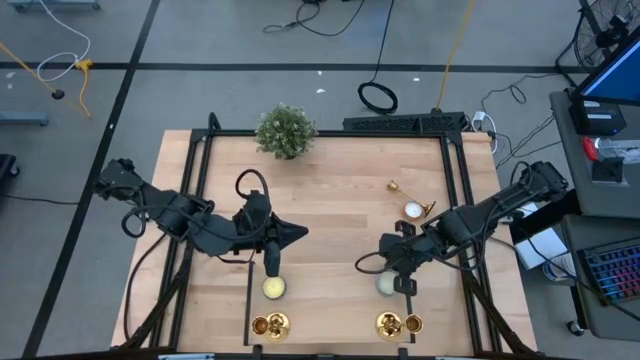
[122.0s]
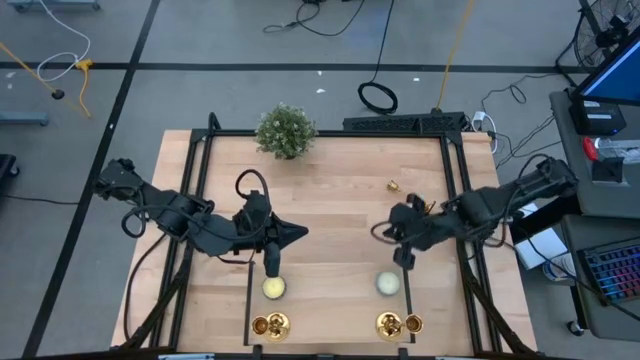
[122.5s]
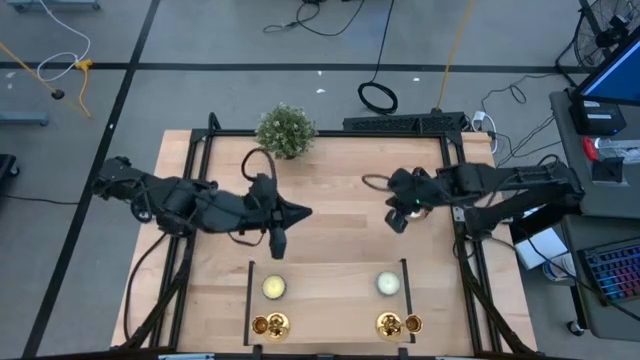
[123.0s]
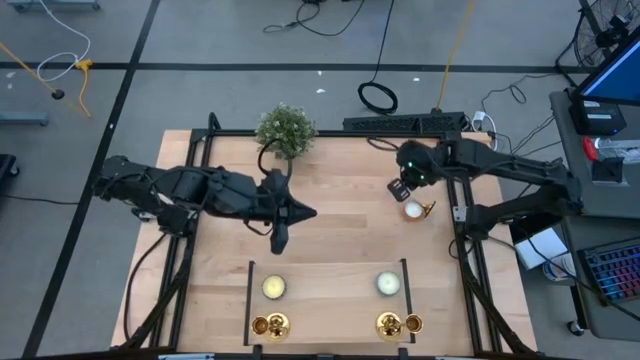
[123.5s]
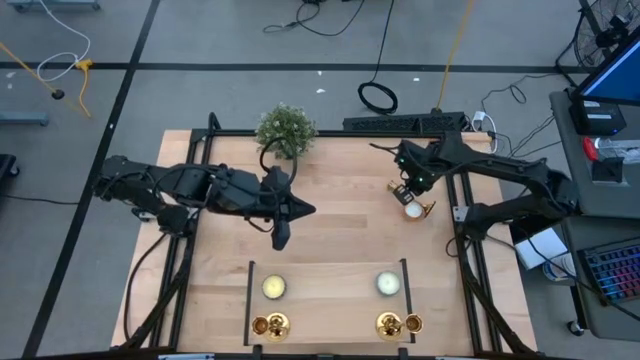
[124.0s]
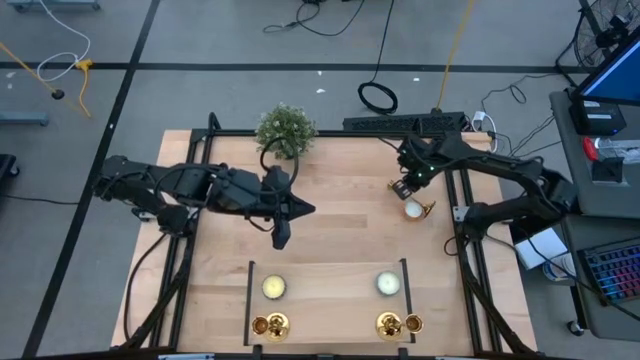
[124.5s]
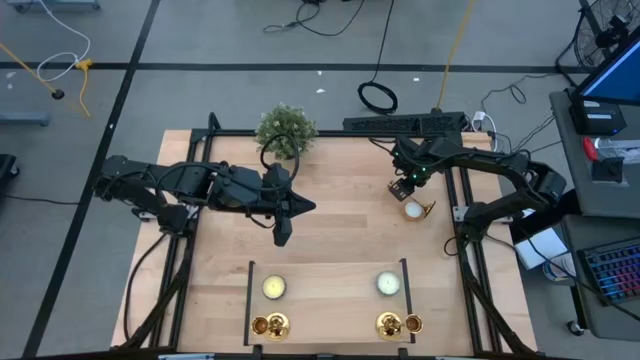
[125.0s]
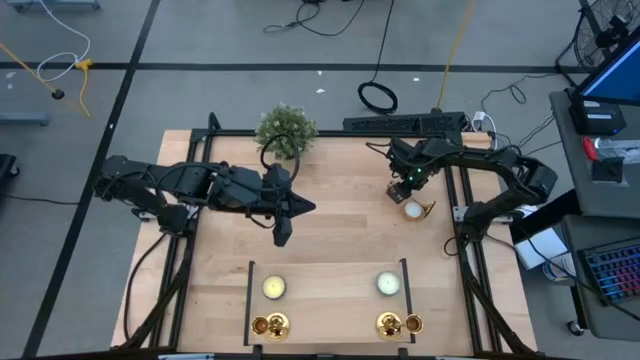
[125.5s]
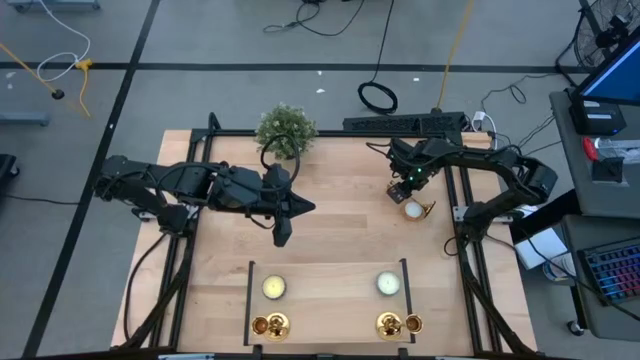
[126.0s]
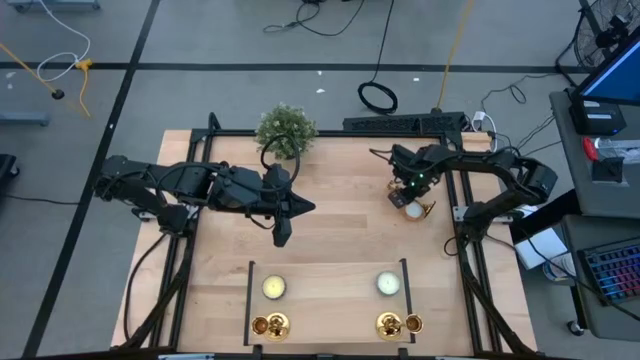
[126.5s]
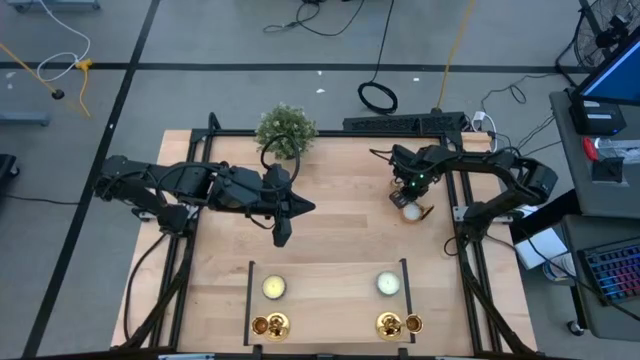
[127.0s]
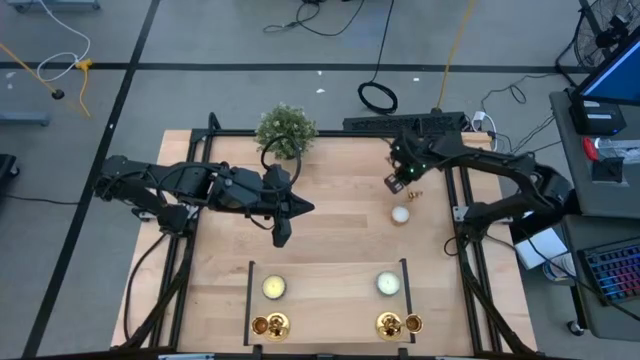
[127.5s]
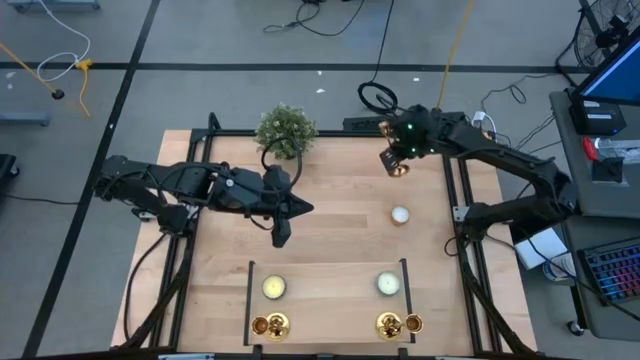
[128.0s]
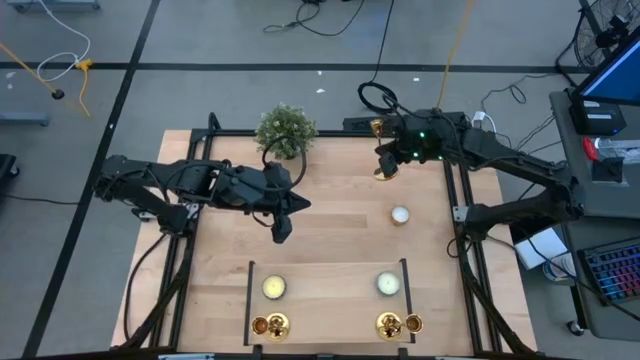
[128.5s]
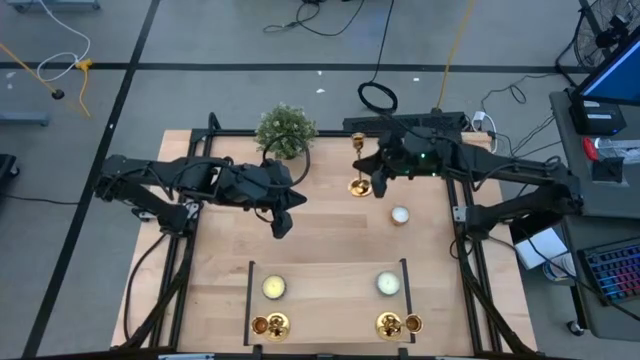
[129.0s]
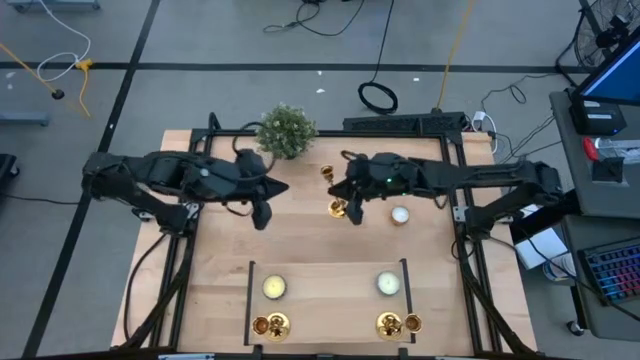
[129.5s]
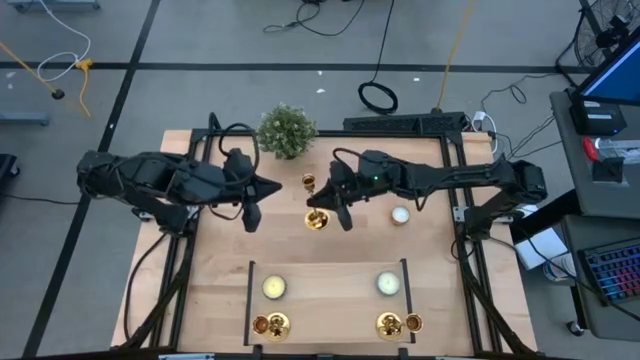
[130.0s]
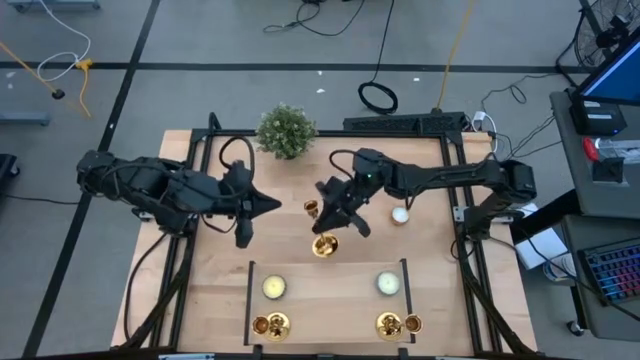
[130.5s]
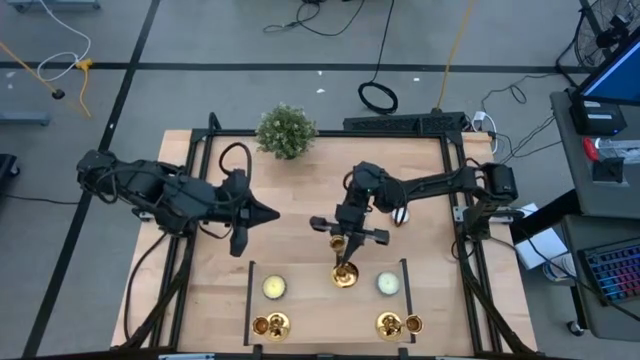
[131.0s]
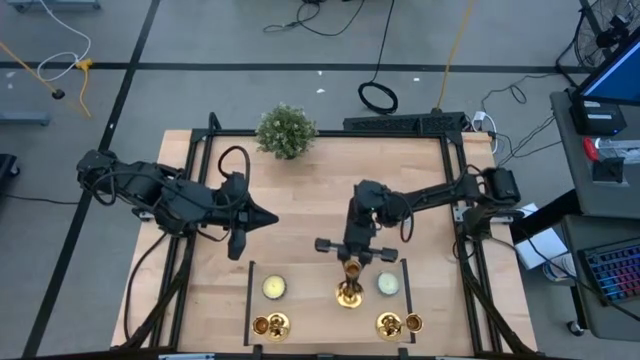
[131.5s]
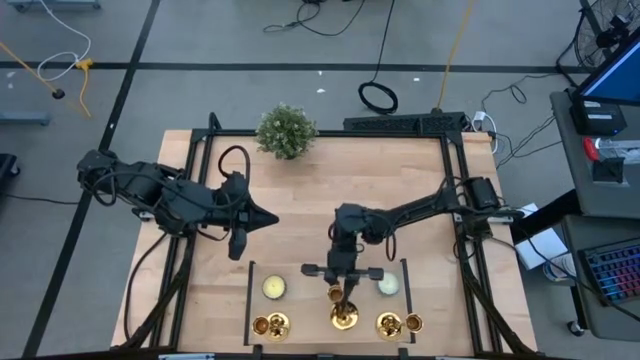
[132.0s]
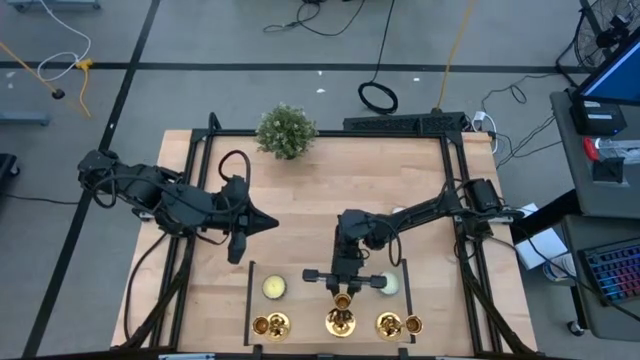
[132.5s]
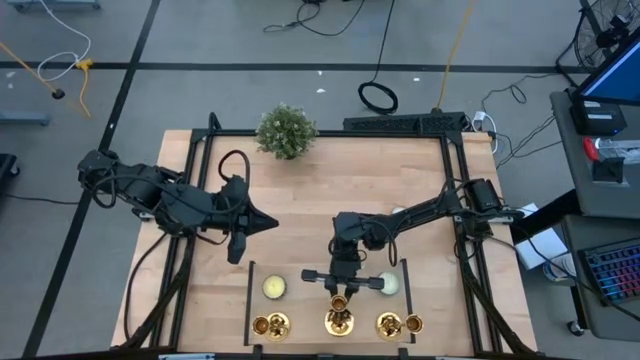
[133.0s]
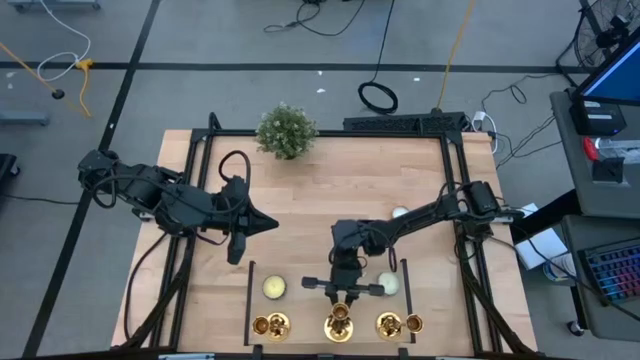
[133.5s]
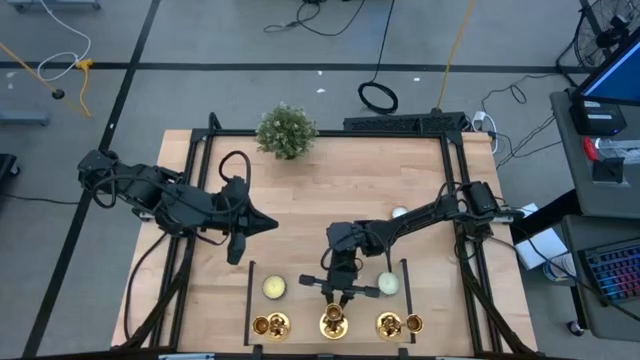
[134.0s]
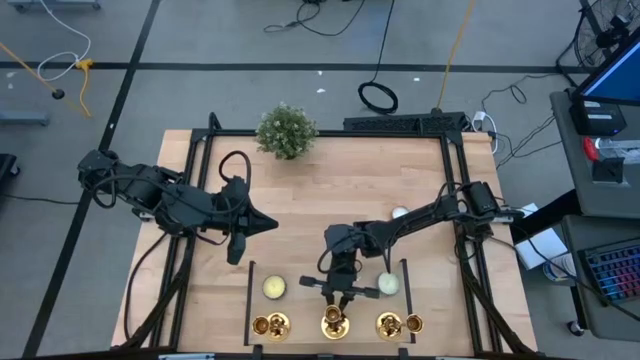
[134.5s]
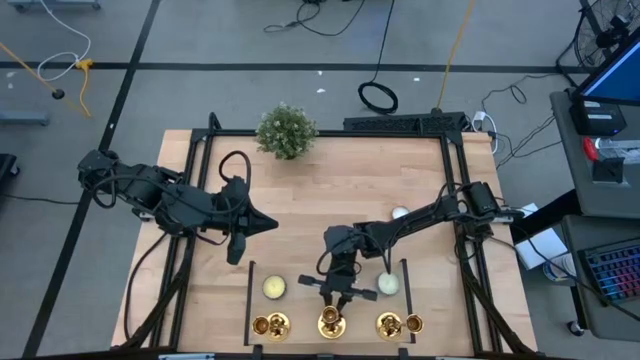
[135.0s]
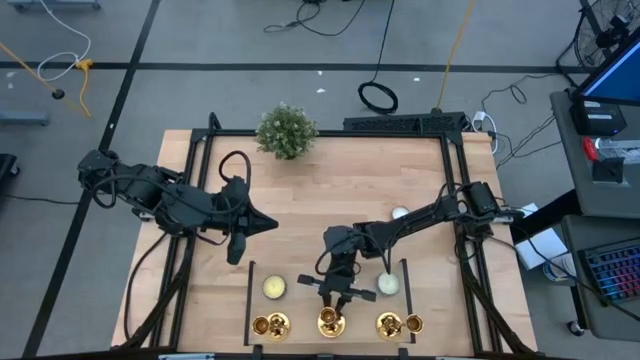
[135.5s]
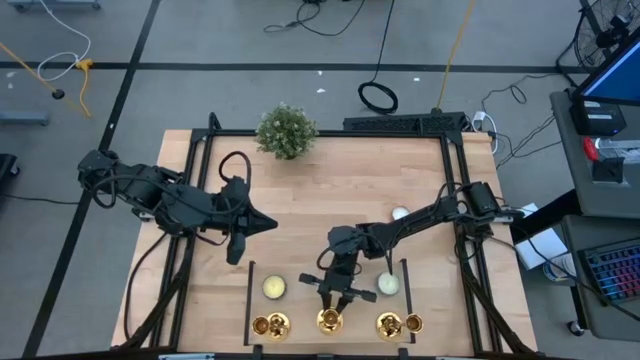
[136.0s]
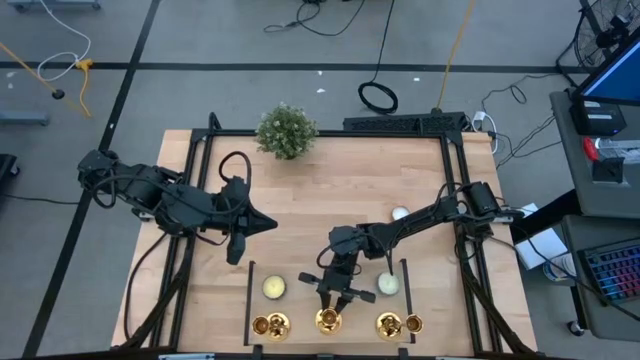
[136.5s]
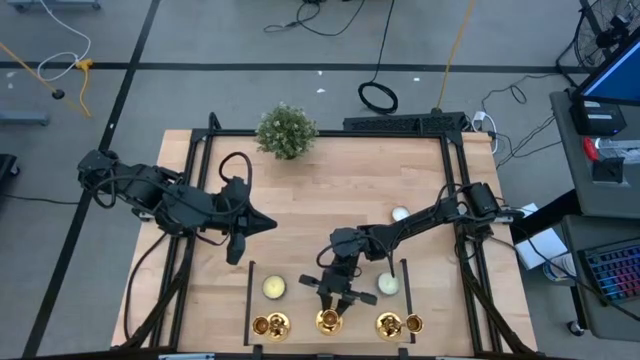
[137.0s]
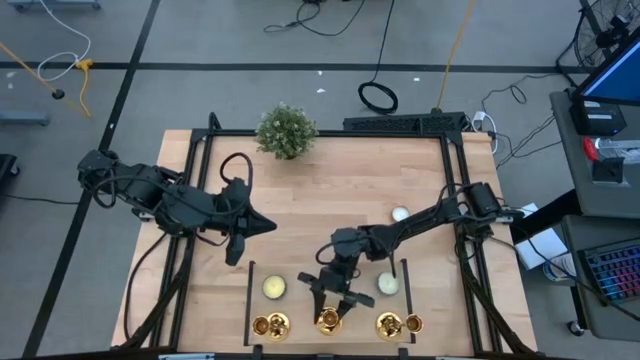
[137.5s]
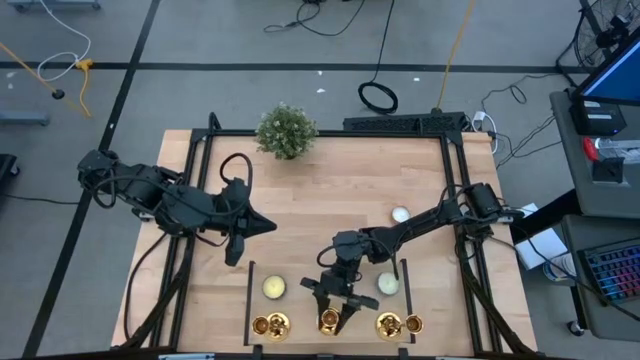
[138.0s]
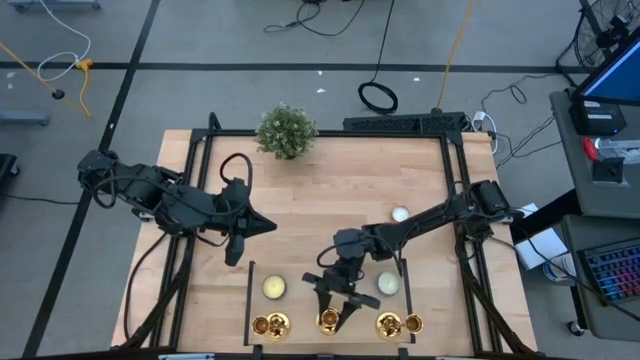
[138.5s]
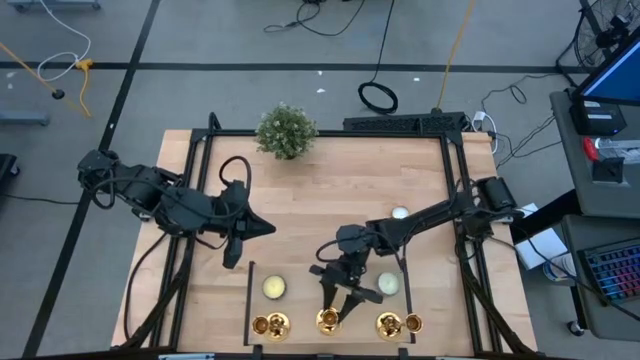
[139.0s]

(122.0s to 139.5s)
Task: Pick & Place candle stick holders
Put the gold candle holder on the shelf

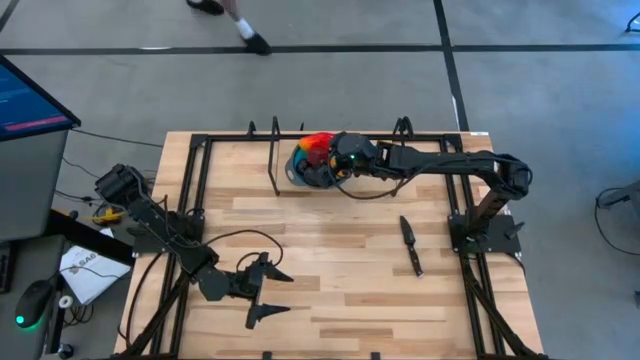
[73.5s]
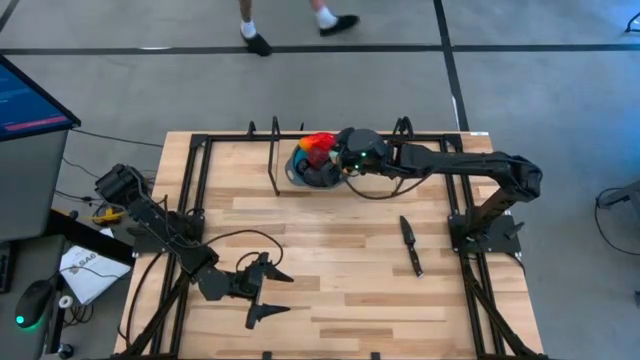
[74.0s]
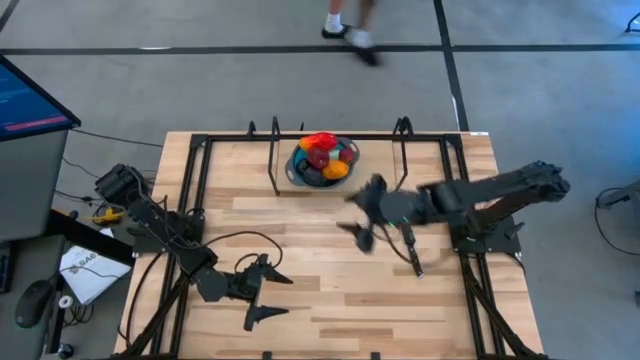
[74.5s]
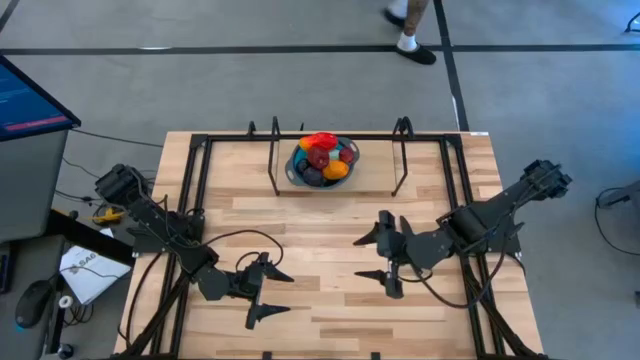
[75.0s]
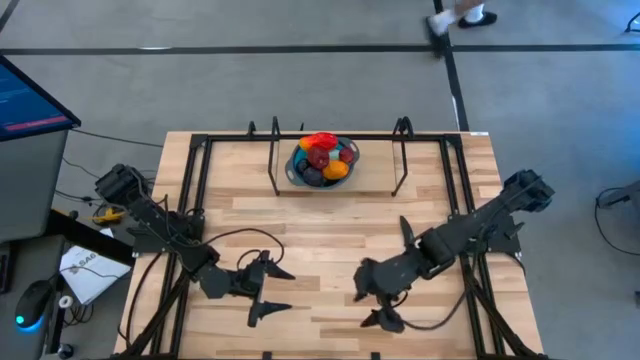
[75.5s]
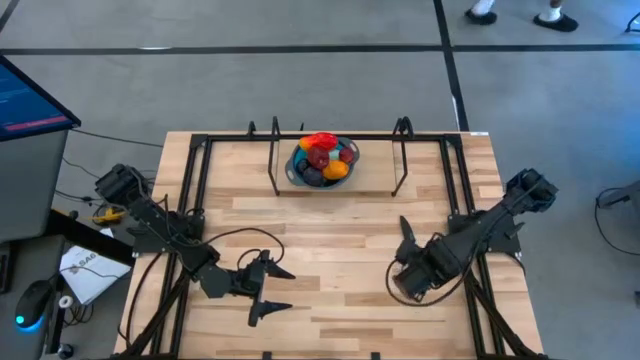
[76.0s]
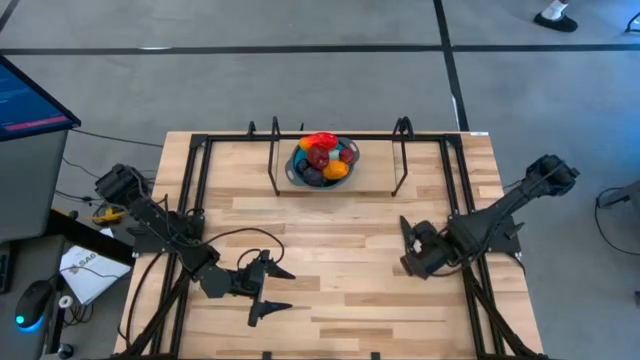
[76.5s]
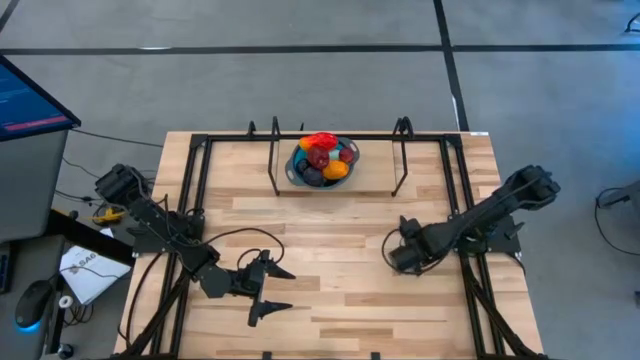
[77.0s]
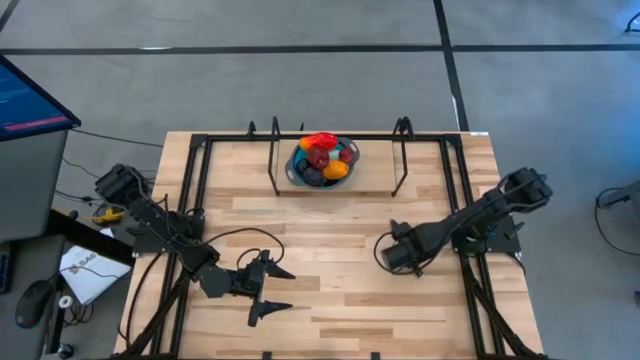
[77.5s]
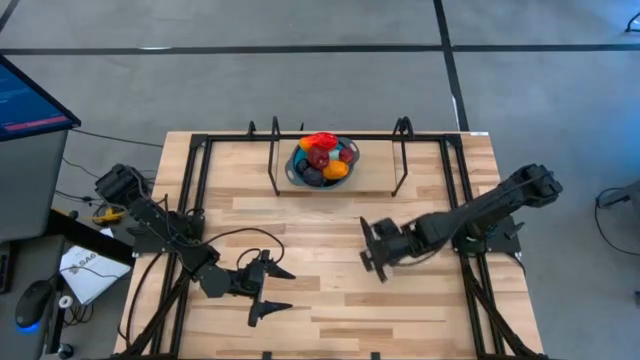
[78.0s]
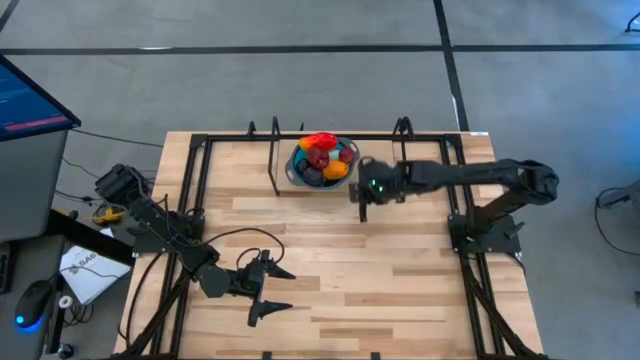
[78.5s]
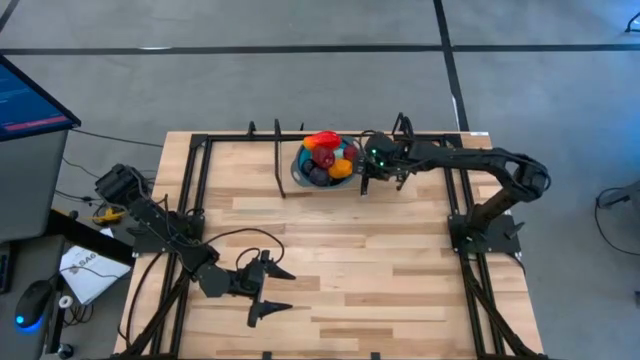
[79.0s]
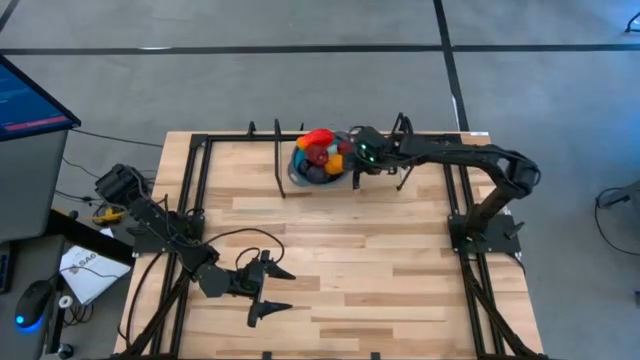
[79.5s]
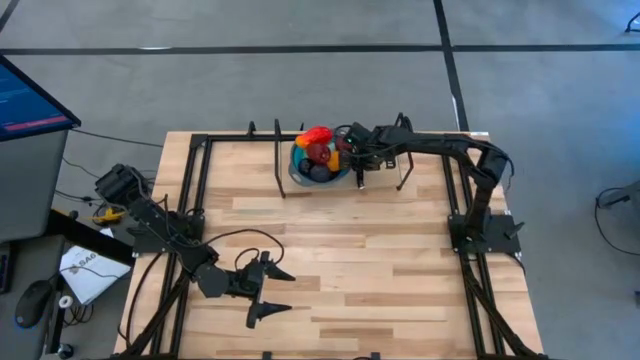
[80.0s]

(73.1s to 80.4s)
Task: Pick & Place Fruit
Put the black knife on the shelf
